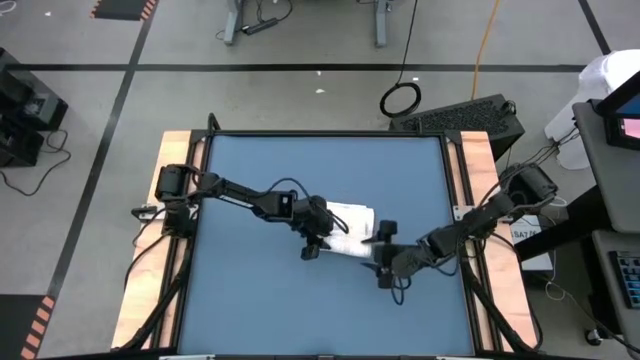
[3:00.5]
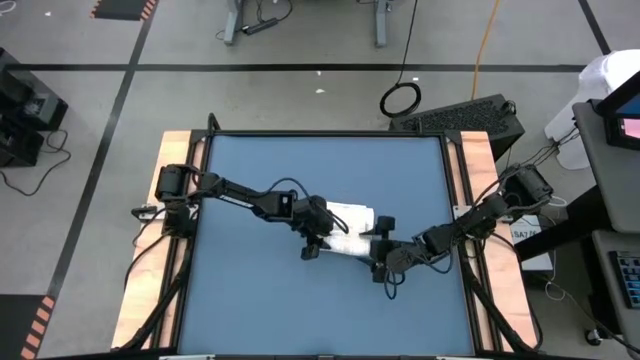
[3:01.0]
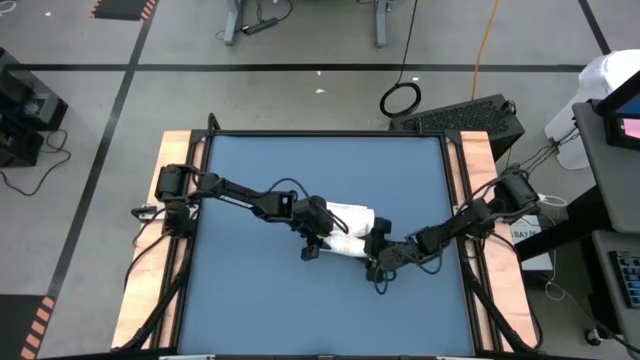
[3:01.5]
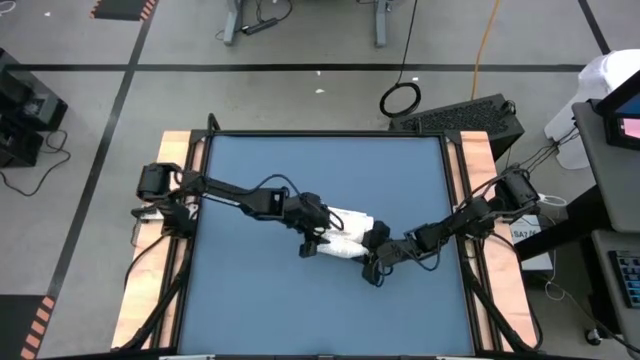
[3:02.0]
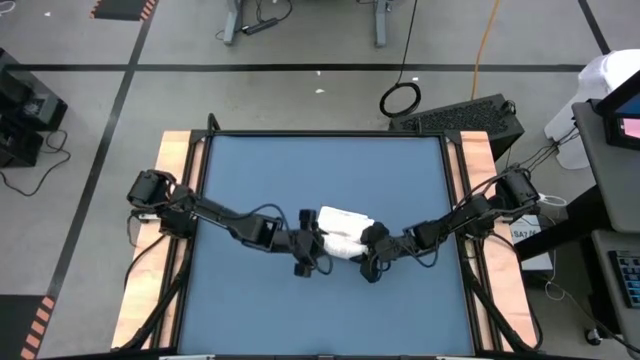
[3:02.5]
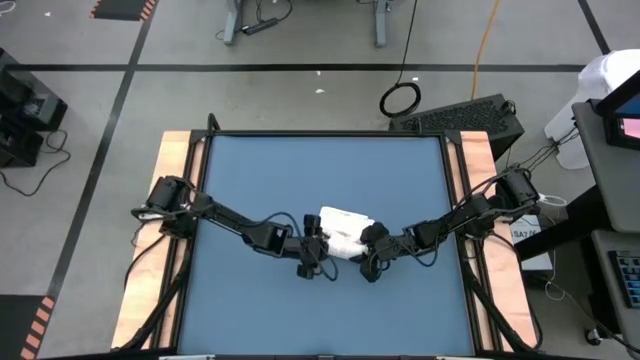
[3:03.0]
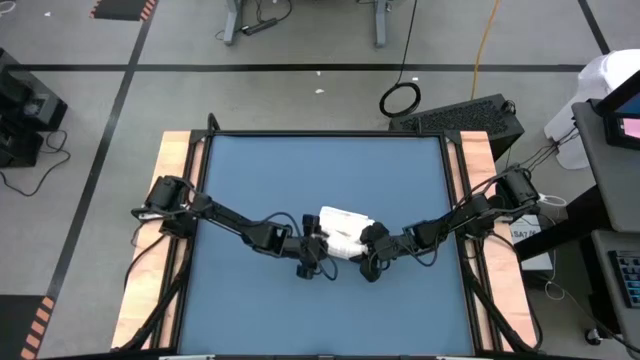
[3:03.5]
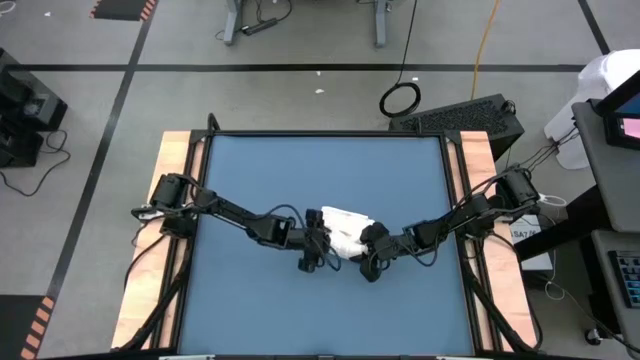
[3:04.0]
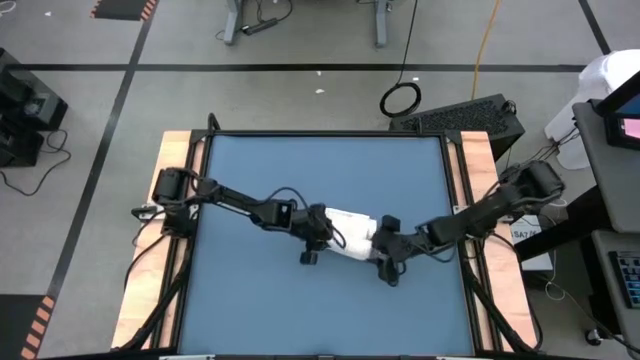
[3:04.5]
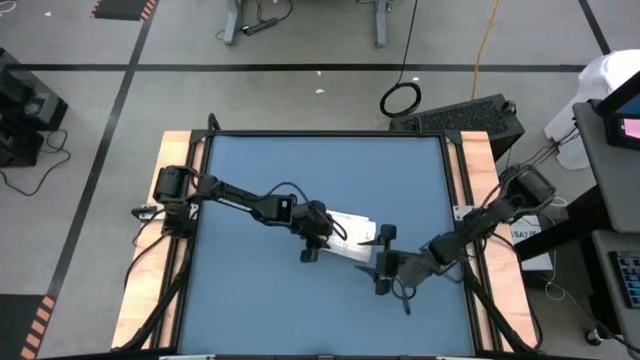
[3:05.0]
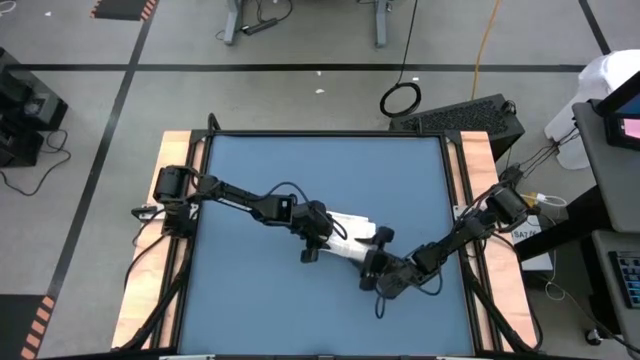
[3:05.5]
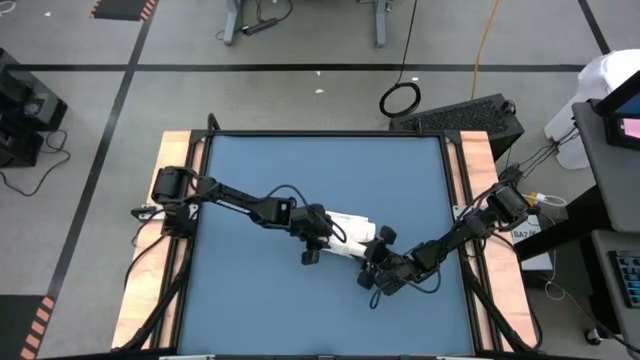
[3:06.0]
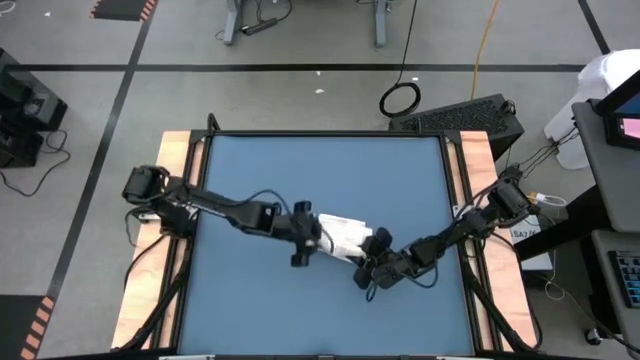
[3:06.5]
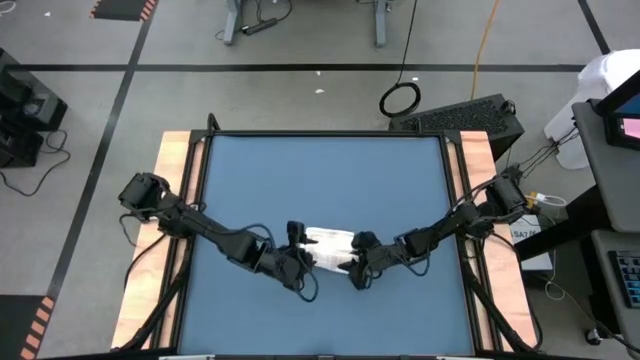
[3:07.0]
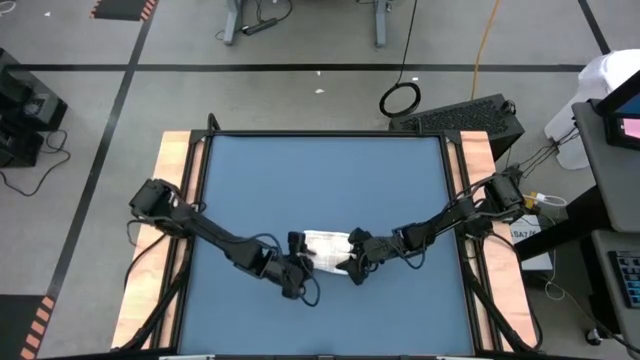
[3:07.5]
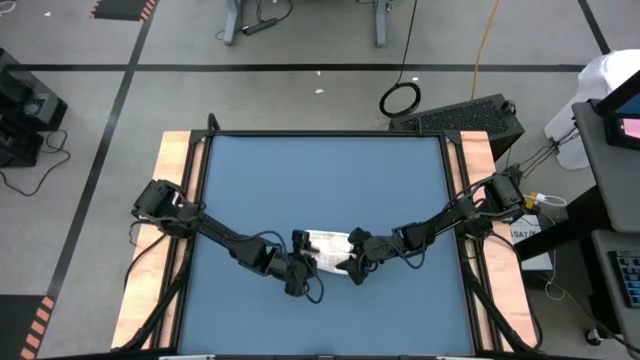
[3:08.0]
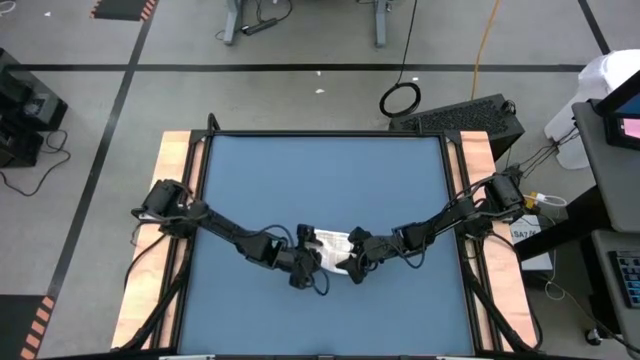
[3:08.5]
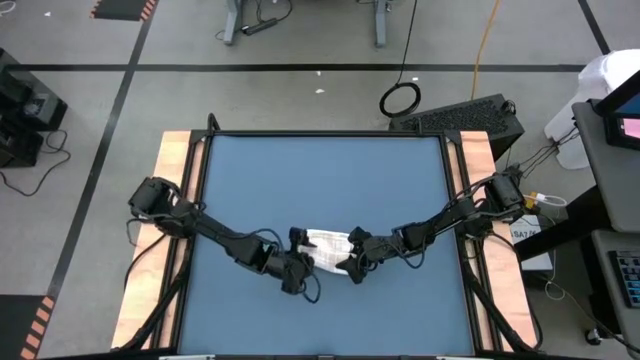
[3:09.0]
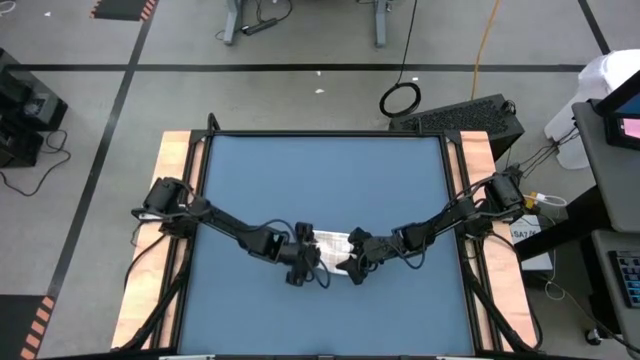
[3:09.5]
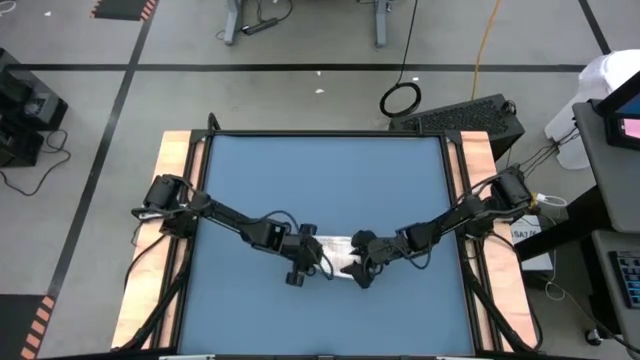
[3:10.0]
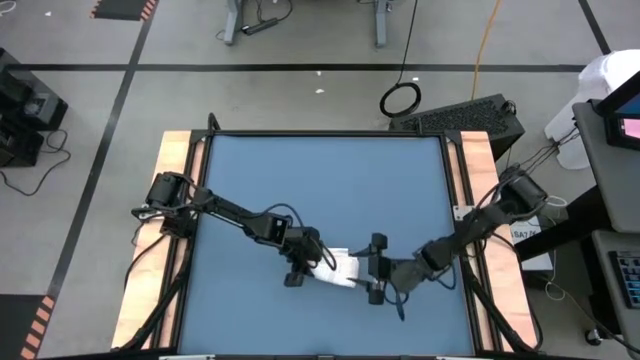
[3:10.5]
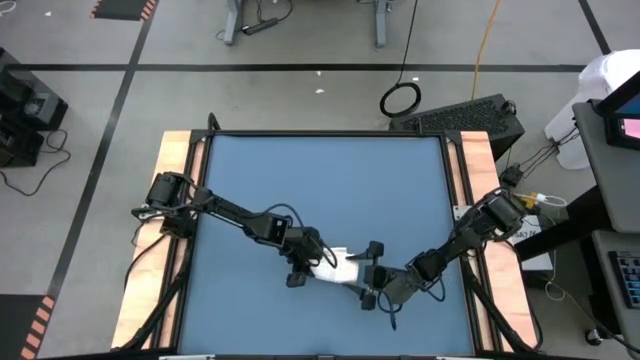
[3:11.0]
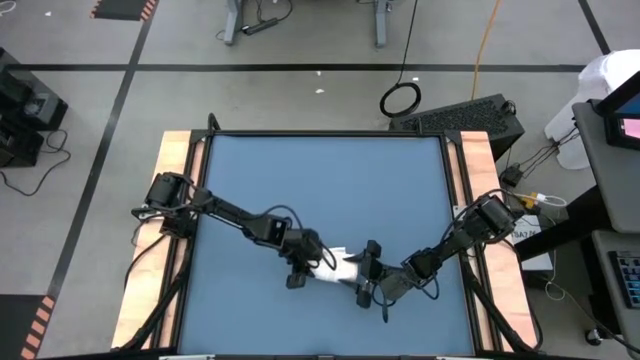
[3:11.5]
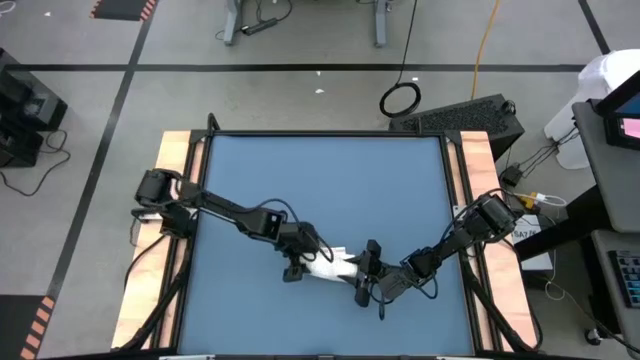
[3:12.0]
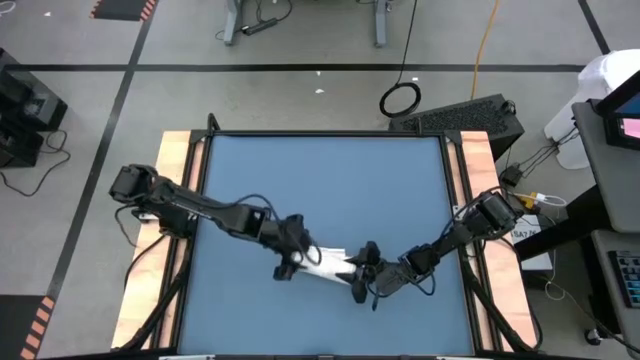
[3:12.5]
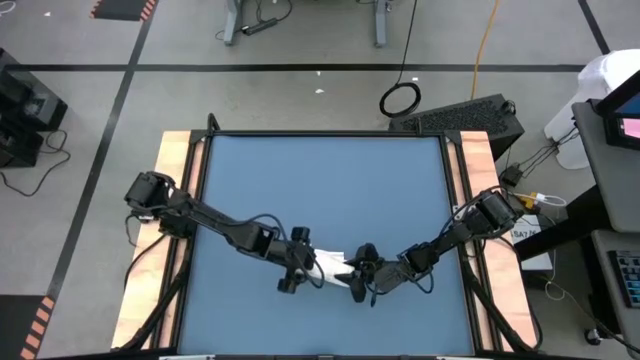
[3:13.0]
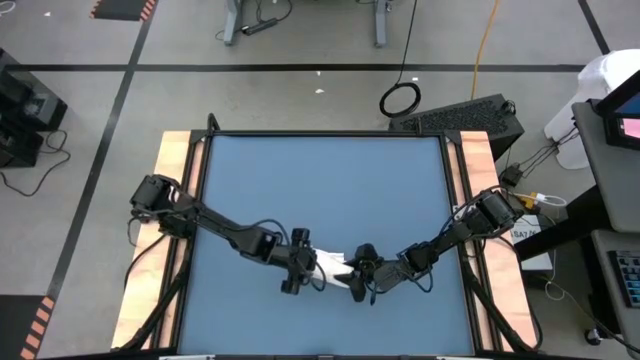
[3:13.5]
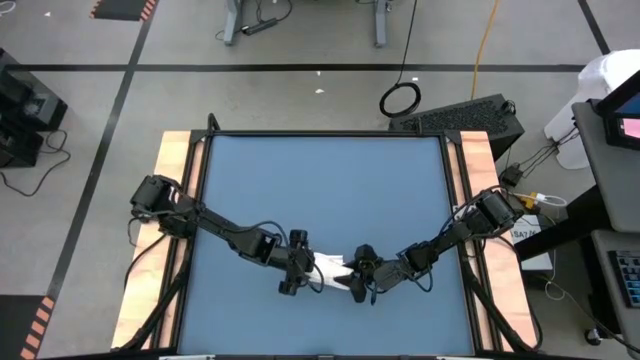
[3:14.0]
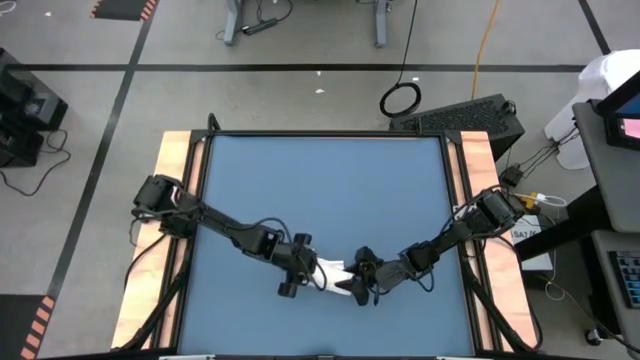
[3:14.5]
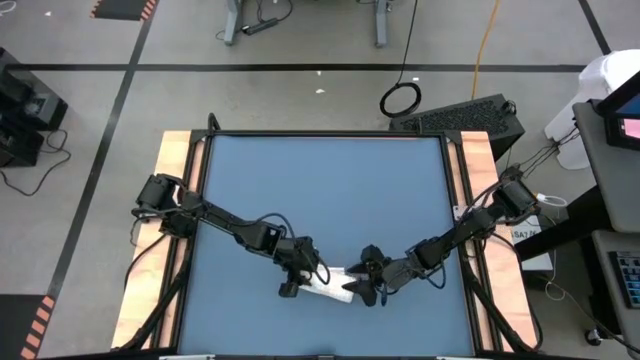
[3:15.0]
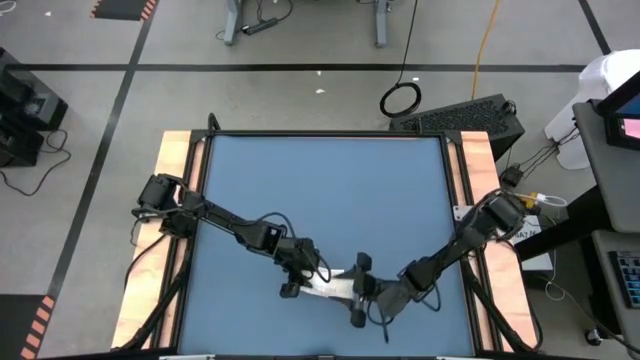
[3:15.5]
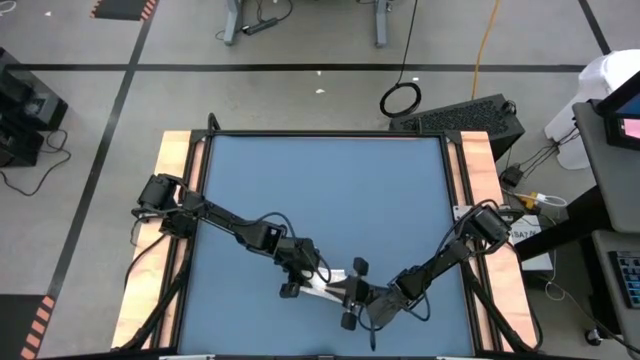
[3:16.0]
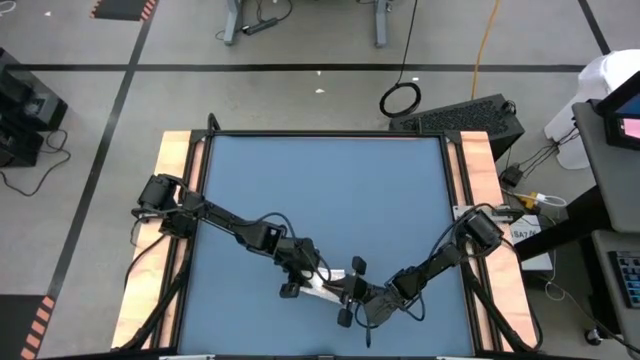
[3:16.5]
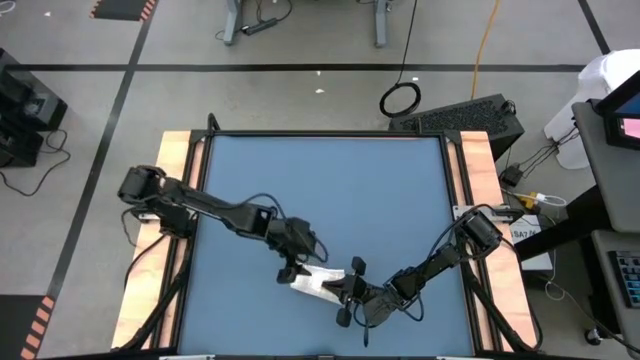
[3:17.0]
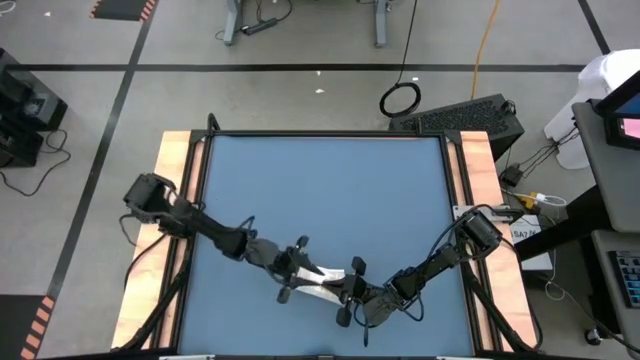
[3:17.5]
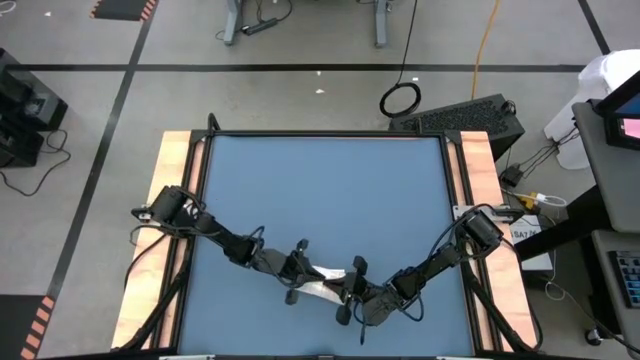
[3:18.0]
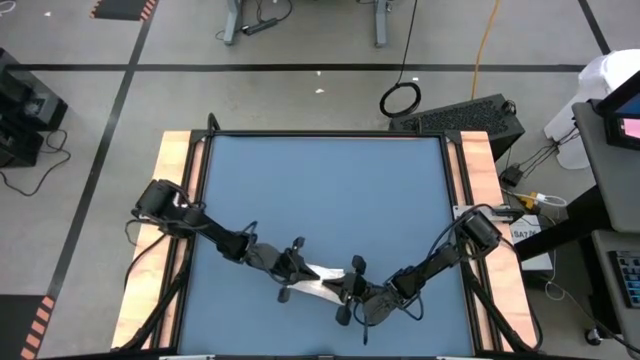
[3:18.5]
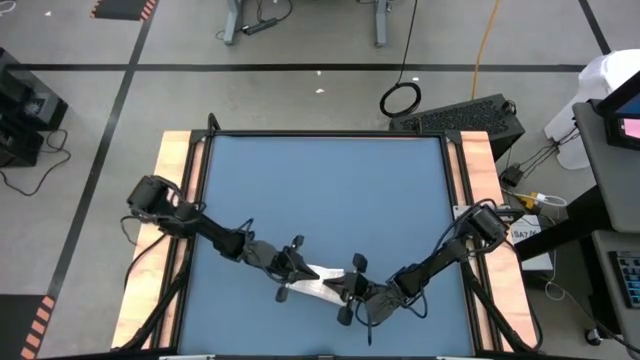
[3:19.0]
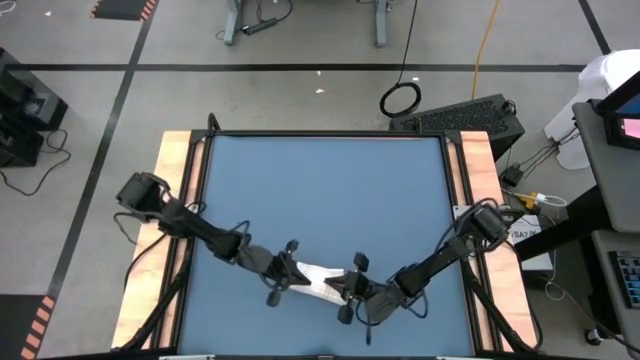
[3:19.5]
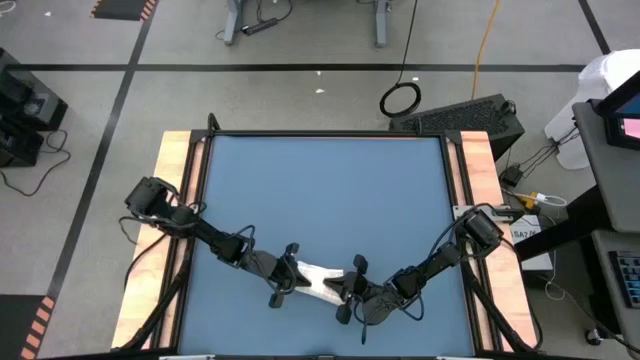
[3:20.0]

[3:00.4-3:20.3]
Task: Roll towel
Roll the white towel

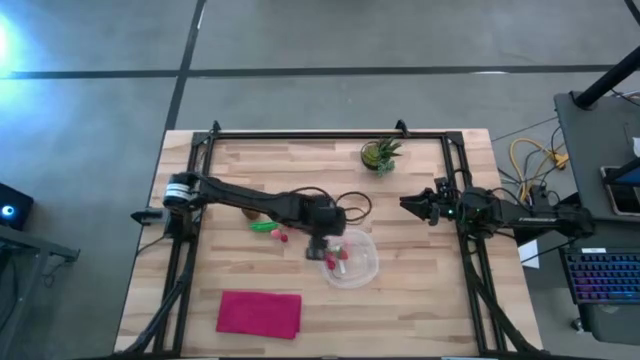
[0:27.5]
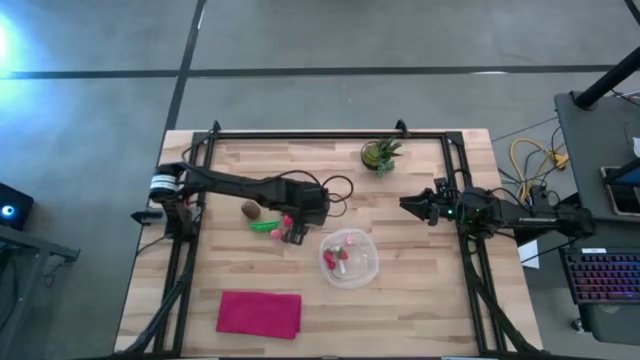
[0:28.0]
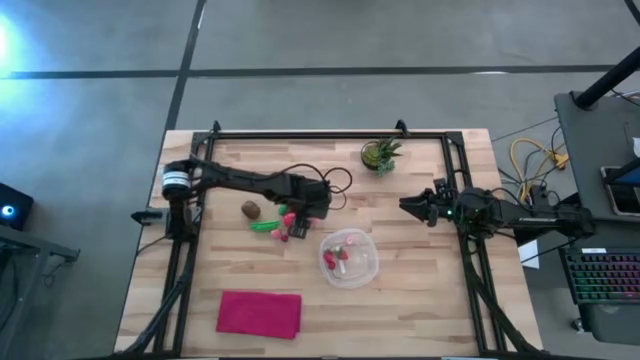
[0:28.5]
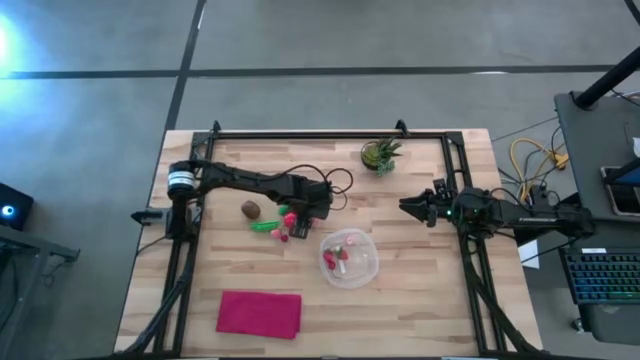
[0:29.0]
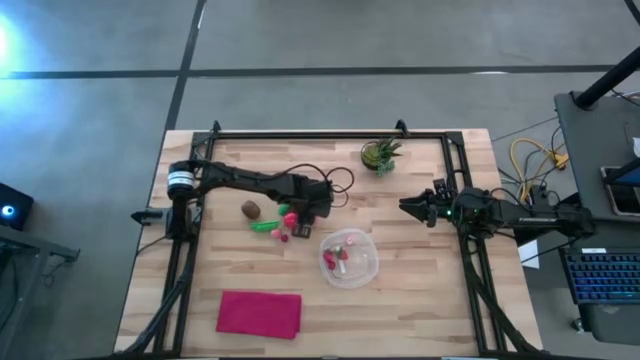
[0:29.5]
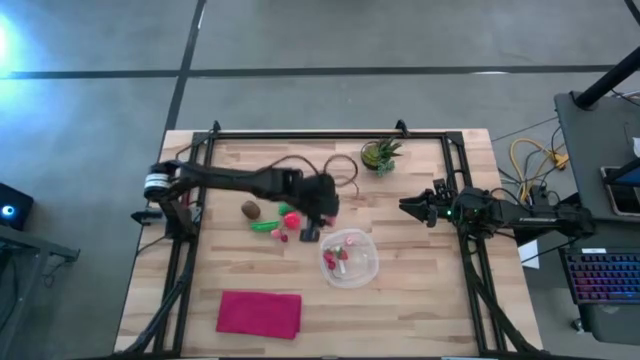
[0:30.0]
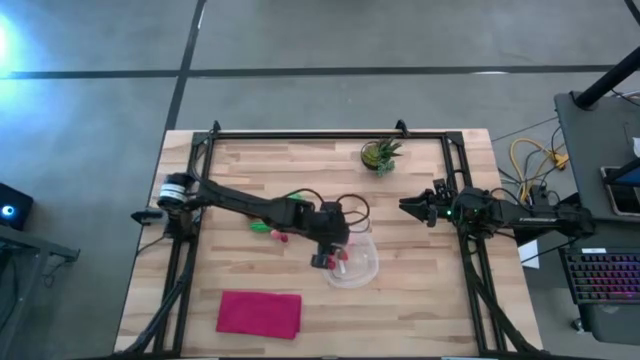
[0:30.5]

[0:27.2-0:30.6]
Task: Pick and placing Produce into tupperware
Put the top peach into the transparent bin
